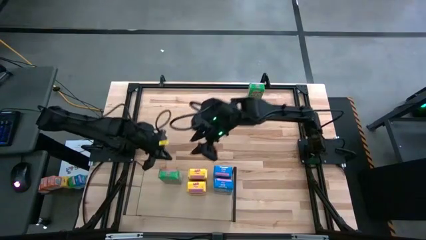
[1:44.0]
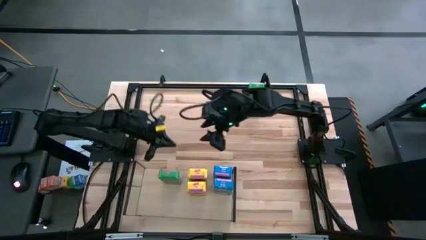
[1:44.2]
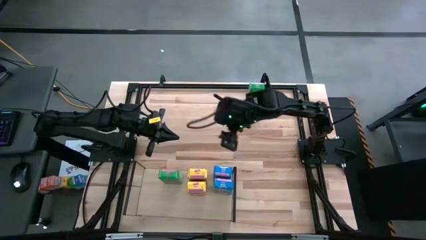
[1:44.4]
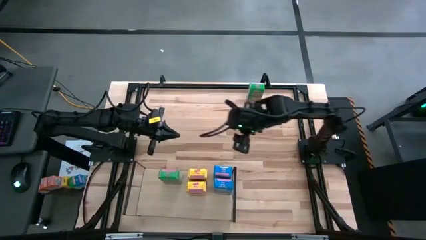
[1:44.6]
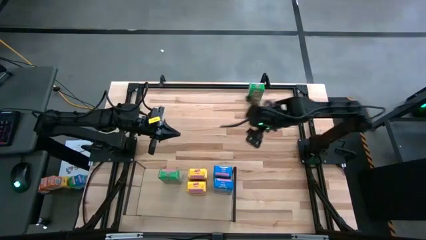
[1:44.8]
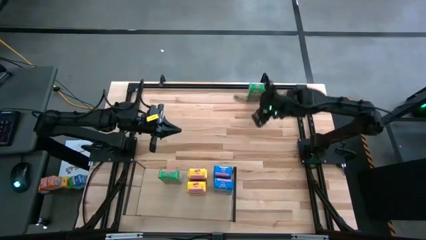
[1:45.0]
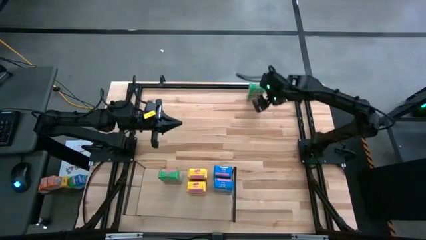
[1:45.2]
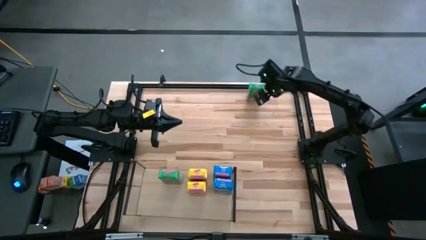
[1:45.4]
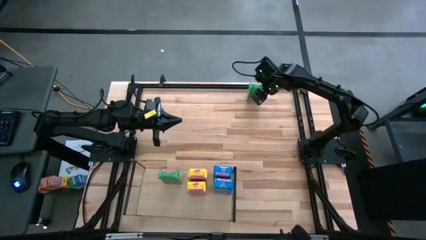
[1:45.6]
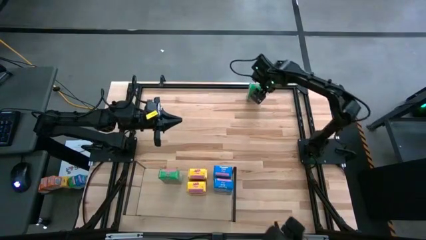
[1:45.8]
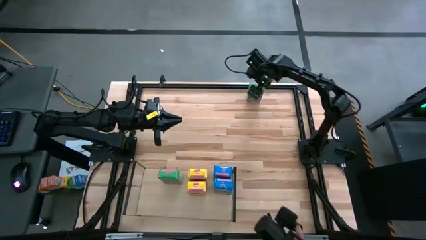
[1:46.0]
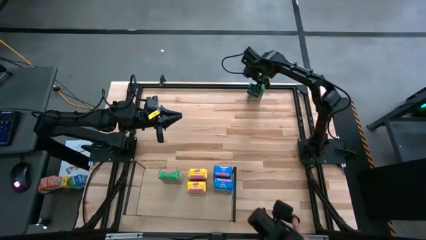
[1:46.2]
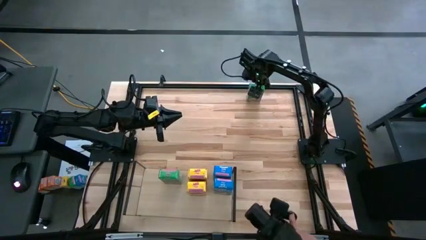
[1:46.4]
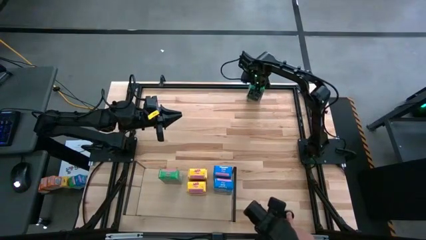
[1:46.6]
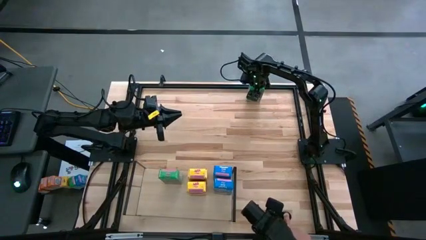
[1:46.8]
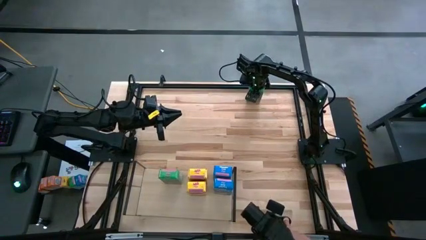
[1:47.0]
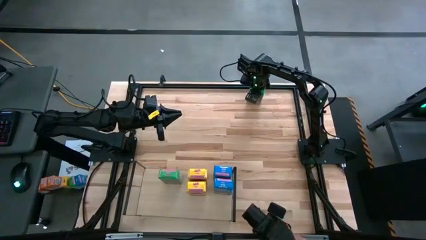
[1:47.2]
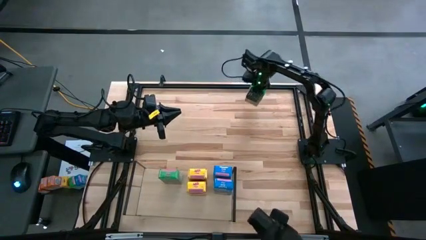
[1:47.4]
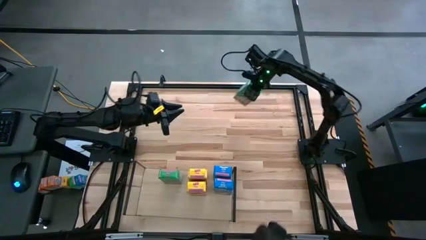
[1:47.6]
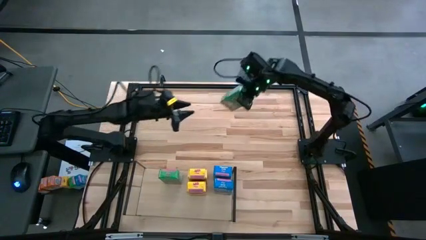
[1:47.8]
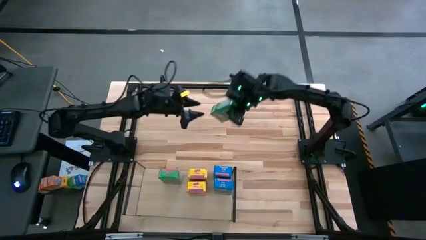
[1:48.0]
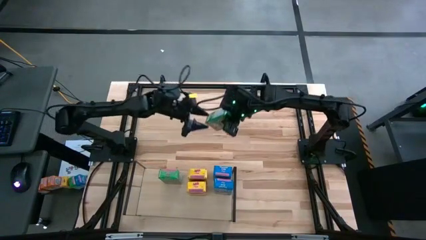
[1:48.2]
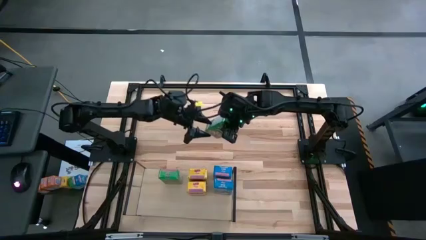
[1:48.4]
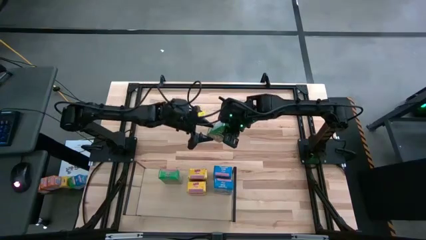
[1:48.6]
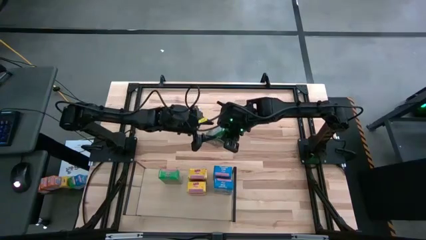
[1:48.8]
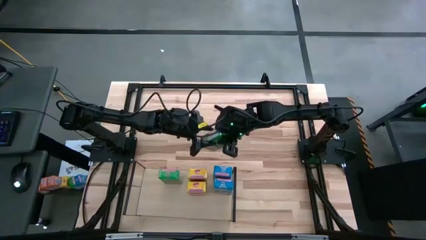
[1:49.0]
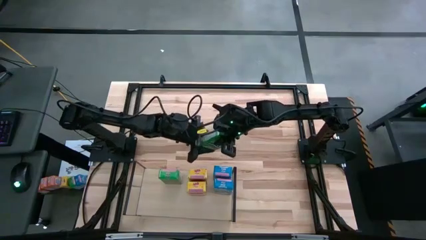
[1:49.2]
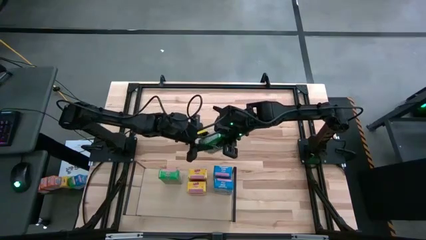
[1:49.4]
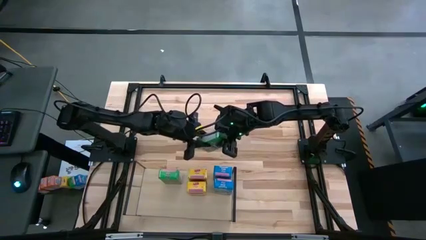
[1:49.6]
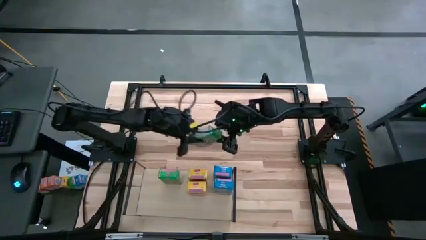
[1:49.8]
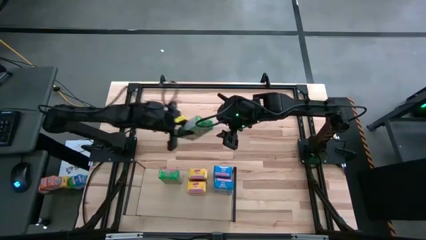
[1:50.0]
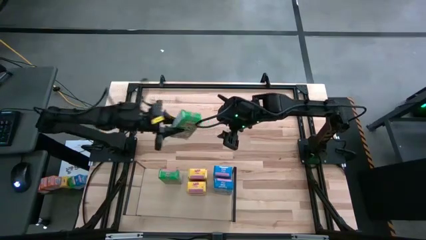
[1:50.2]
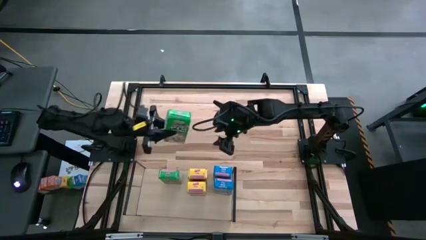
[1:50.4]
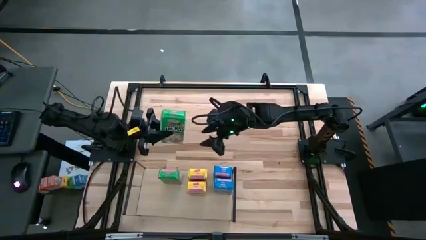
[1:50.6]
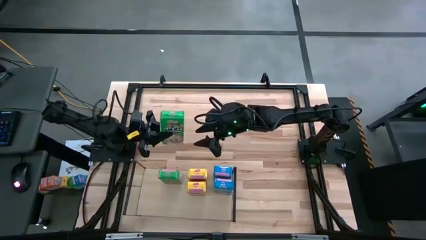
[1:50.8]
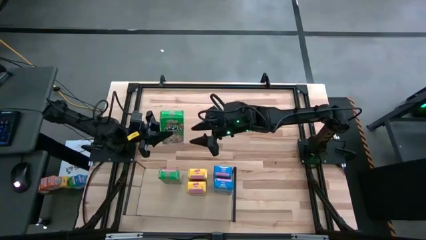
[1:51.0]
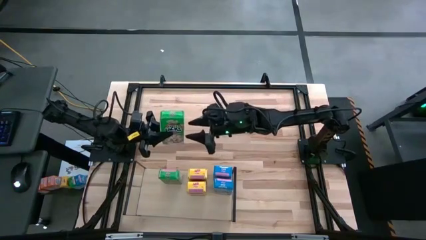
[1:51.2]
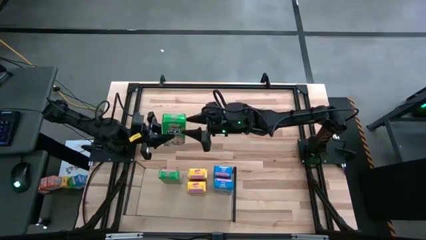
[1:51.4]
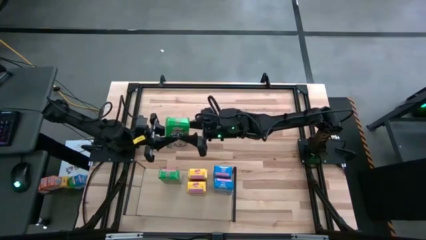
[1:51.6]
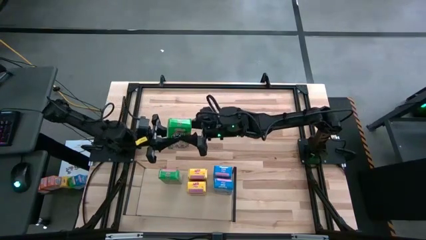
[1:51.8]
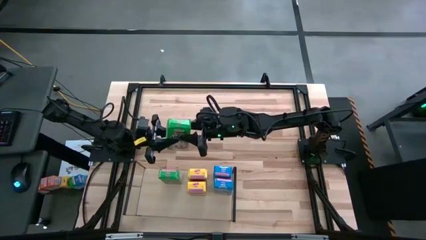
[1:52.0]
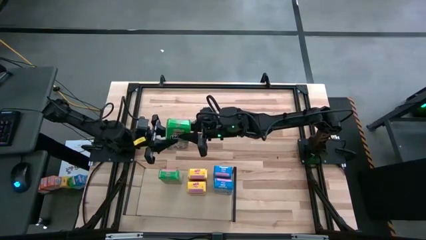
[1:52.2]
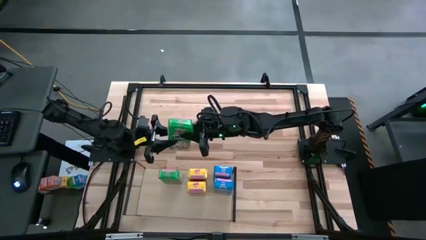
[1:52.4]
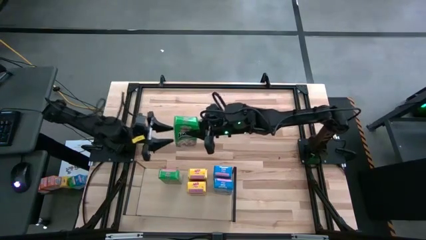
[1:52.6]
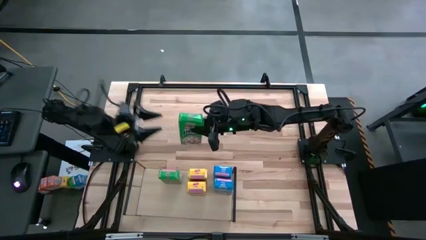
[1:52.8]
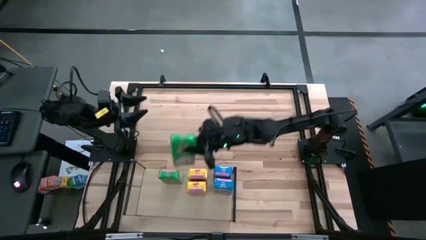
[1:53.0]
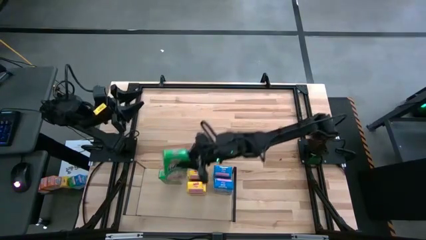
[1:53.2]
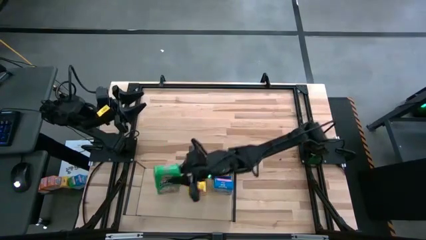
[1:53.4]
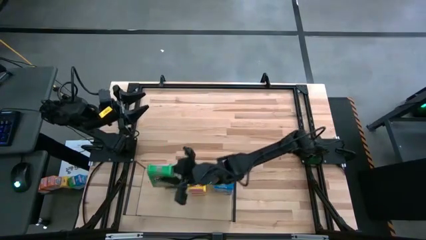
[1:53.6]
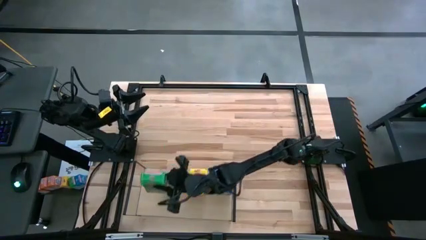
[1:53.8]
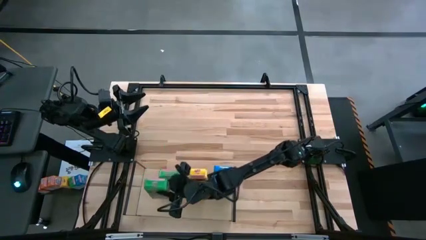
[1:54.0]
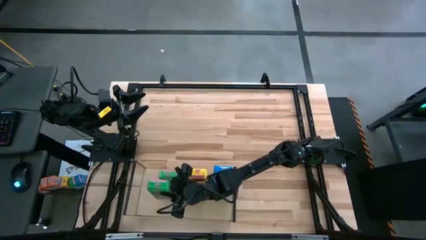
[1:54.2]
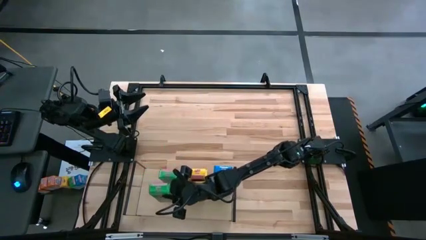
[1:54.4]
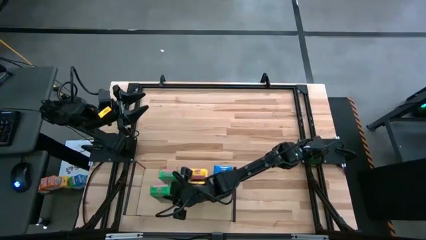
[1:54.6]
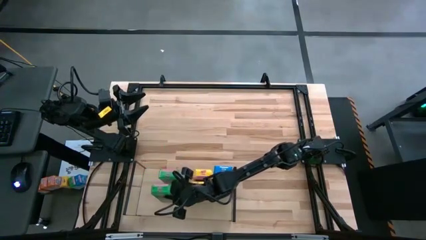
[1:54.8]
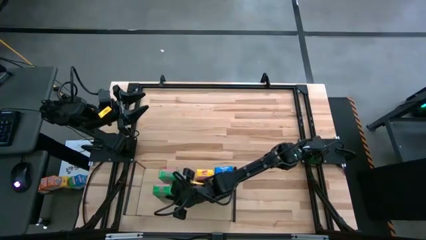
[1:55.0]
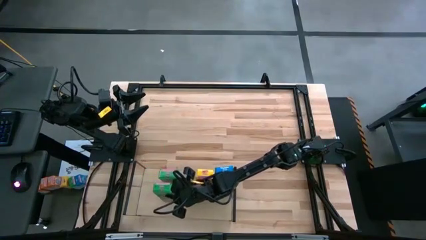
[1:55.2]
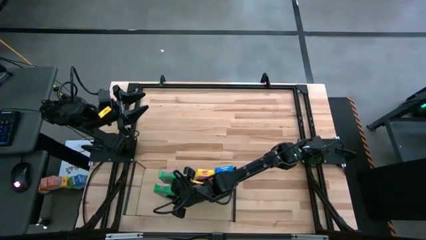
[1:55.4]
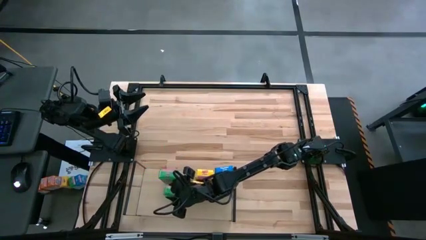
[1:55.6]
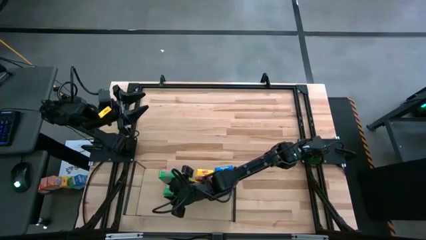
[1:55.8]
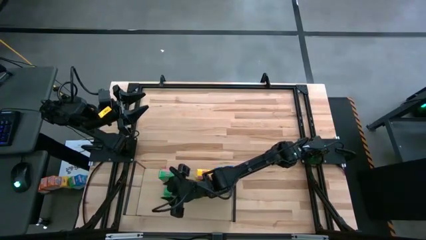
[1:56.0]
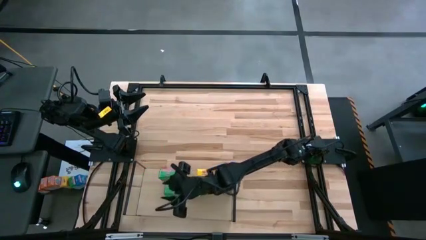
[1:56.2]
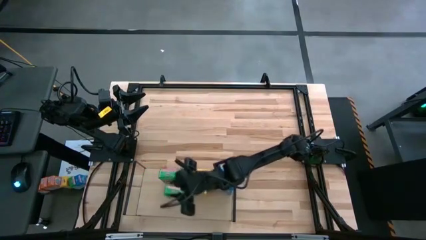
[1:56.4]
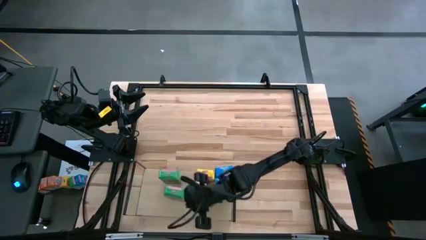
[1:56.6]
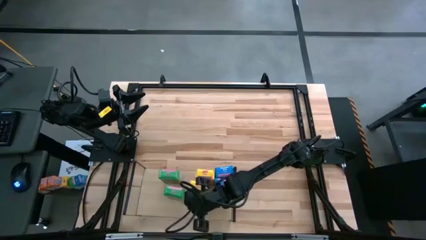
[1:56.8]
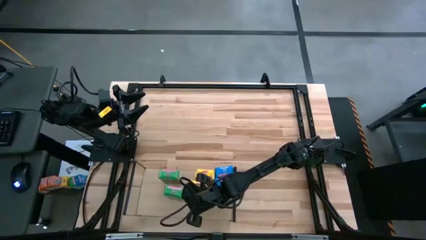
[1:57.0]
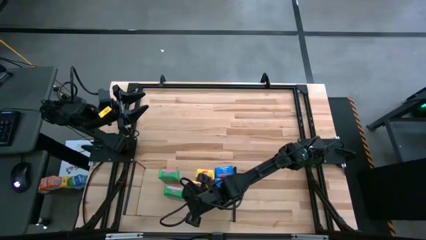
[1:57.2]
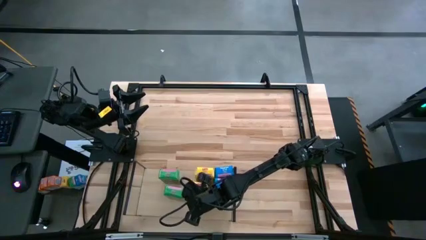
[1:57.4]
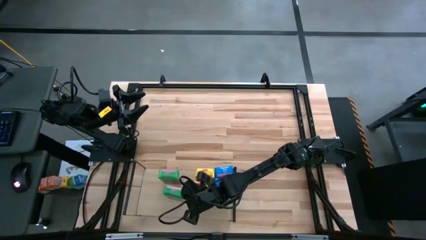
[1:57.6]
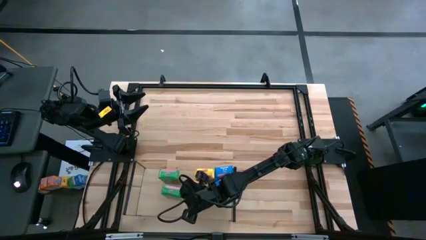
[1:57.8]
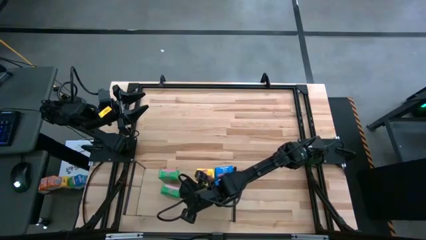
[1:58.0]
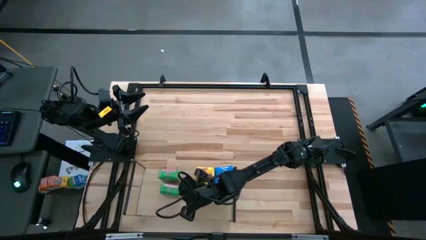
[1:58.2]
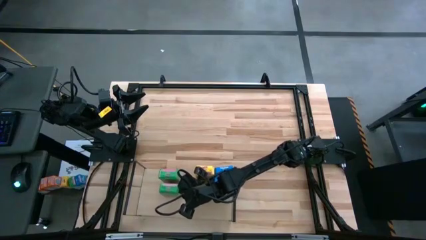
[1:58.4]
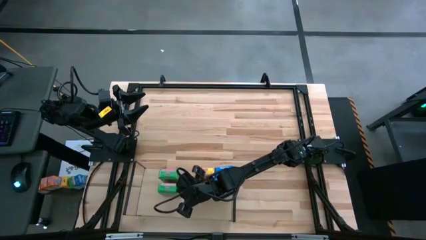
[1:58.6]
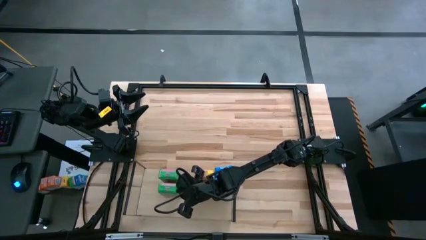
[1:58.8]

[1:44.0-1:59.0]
Task: Stack cereal on shelf
Put the green cereal box on the shelf aligned with the green cereal box

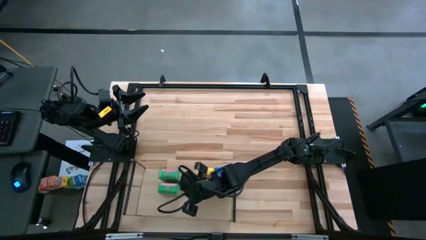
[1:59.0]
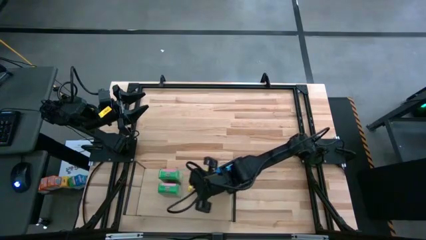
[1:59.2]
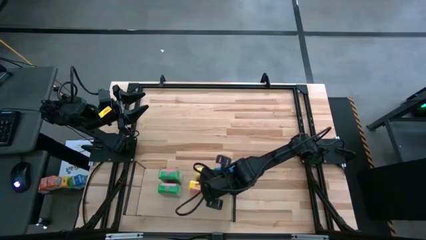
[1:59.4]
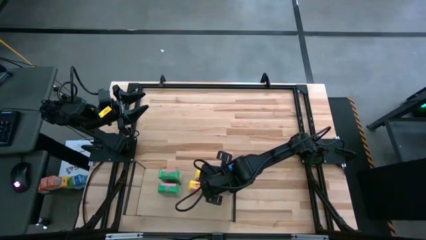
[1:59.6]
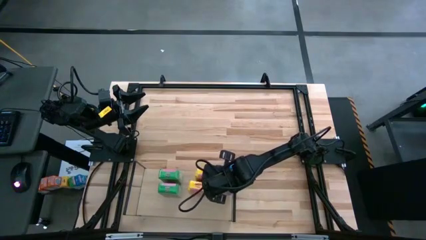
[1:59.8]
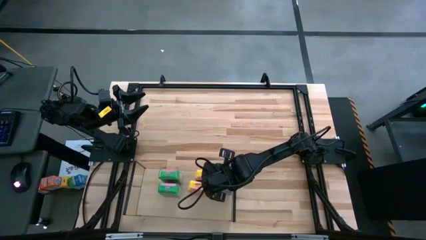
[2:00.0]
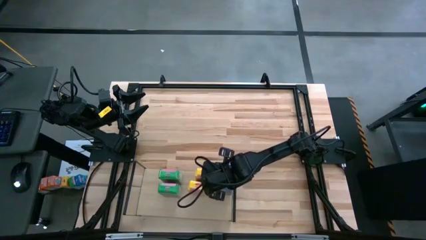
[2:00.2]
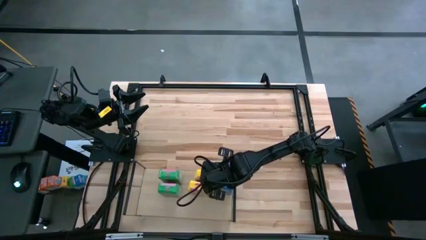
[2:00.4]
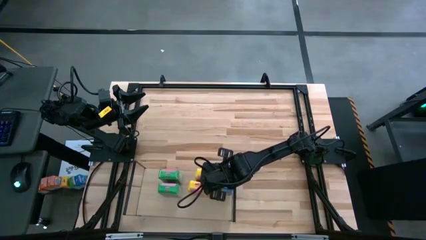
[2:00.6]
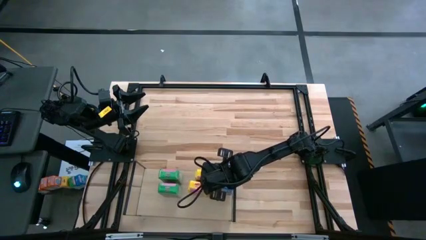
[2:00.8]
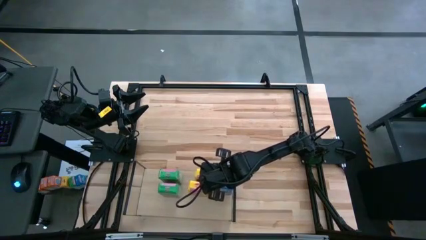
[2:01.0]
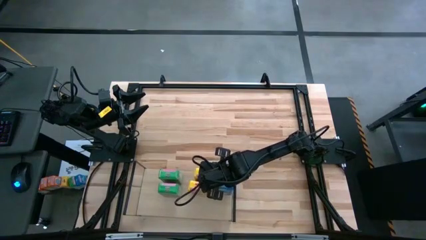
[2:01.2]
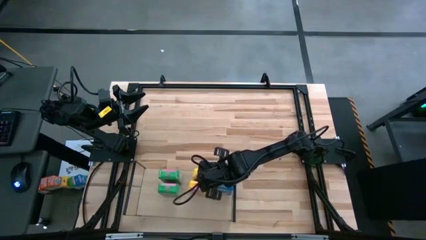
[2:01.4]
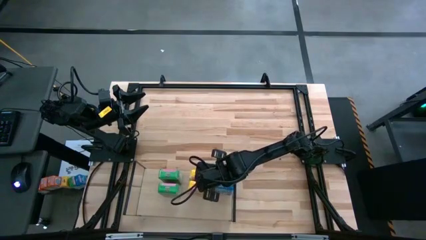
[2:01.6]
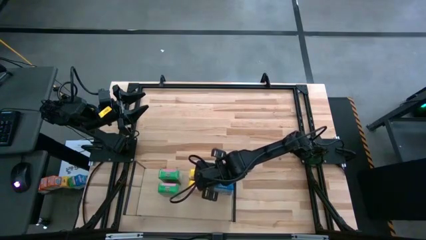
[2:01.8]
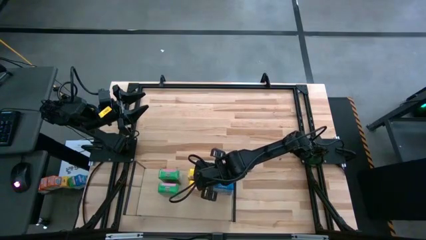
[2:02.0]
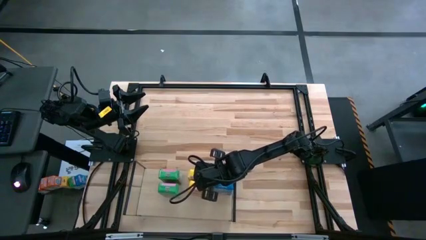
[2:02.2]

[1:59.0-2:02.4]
Adjust the yellow cereal box
